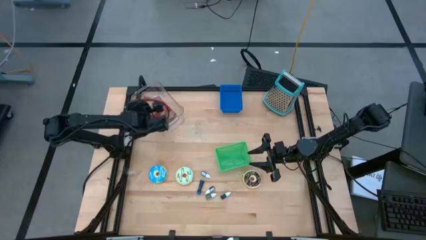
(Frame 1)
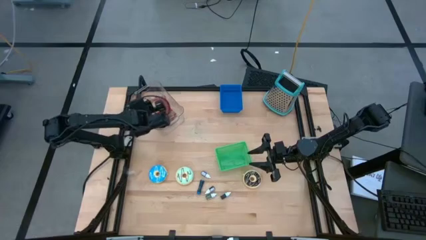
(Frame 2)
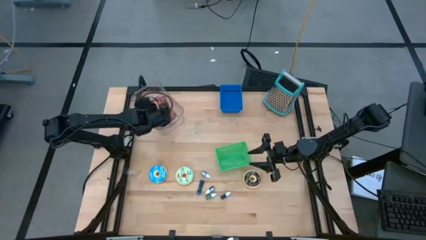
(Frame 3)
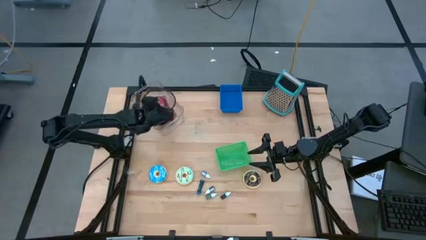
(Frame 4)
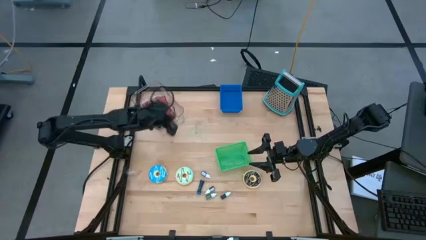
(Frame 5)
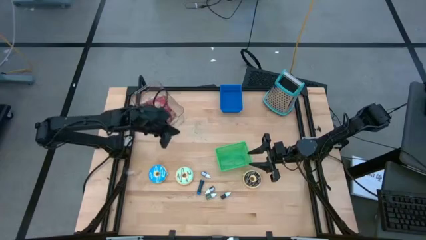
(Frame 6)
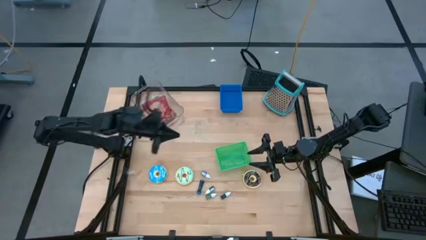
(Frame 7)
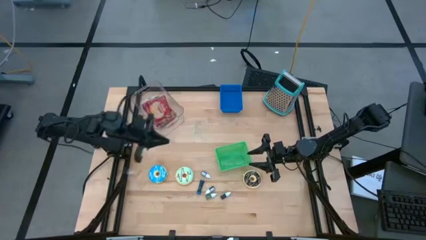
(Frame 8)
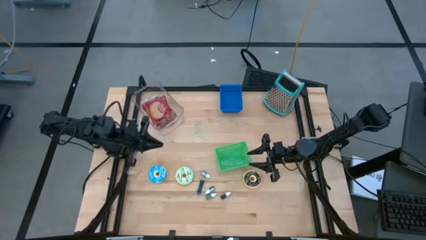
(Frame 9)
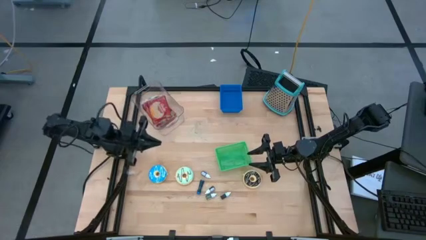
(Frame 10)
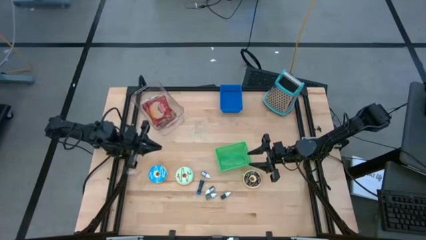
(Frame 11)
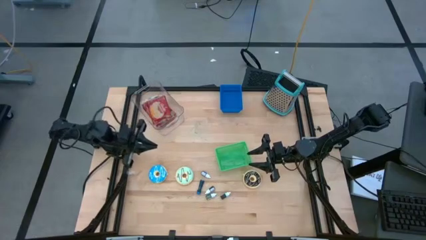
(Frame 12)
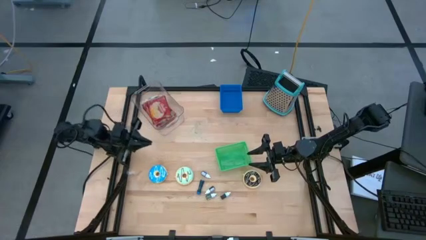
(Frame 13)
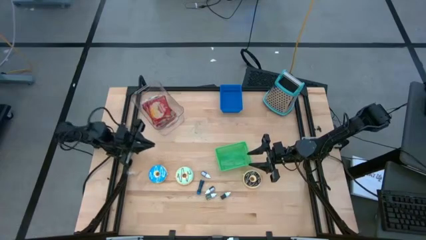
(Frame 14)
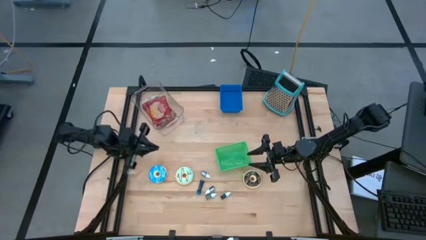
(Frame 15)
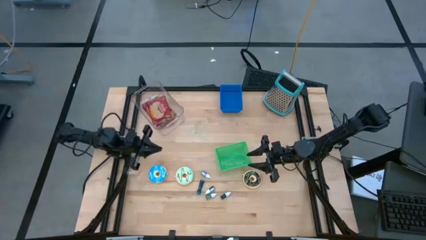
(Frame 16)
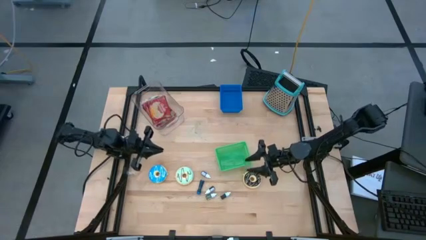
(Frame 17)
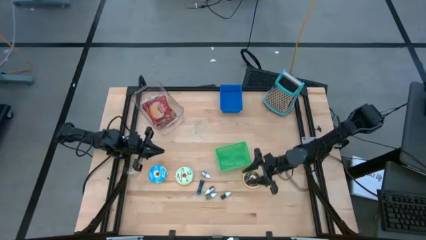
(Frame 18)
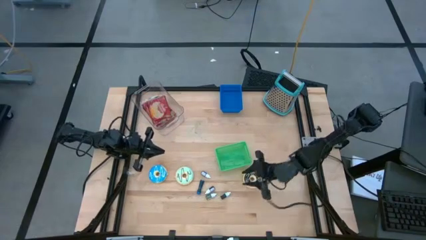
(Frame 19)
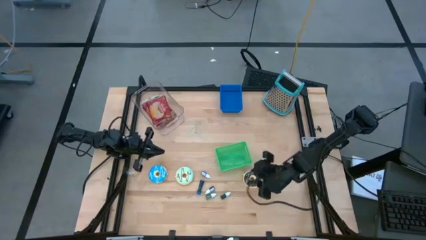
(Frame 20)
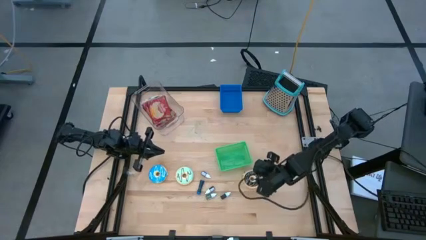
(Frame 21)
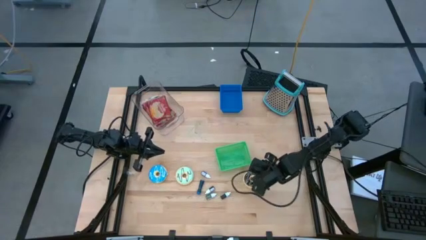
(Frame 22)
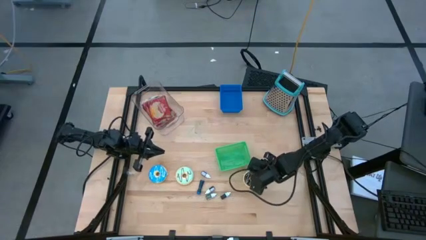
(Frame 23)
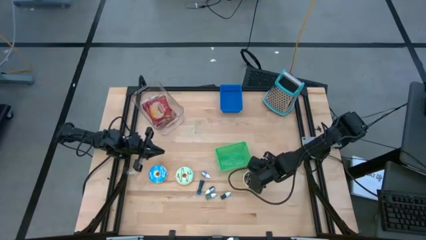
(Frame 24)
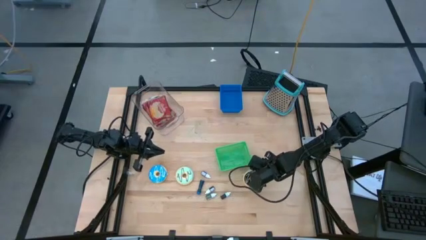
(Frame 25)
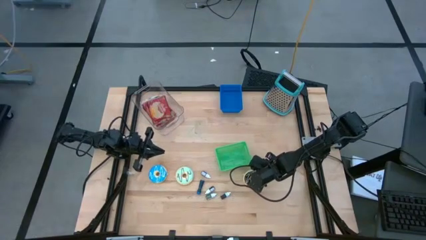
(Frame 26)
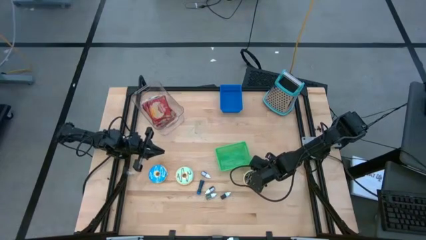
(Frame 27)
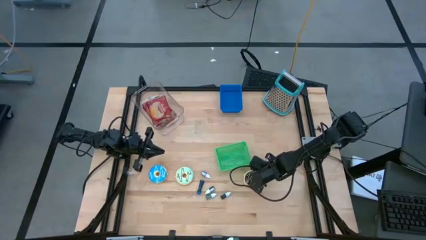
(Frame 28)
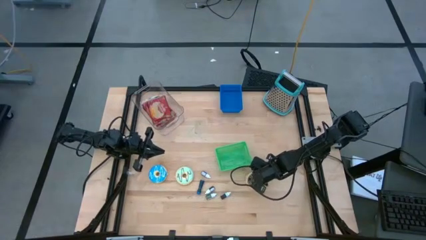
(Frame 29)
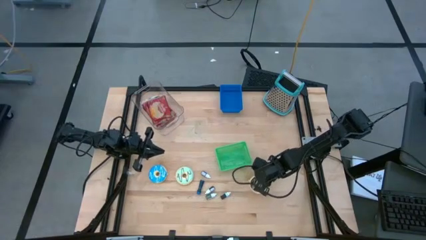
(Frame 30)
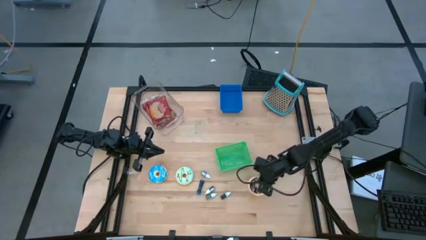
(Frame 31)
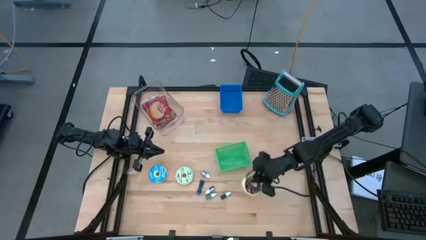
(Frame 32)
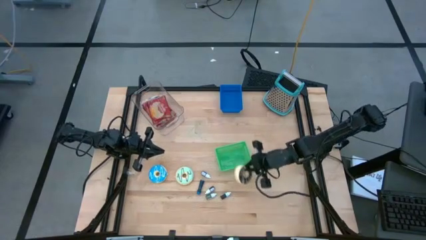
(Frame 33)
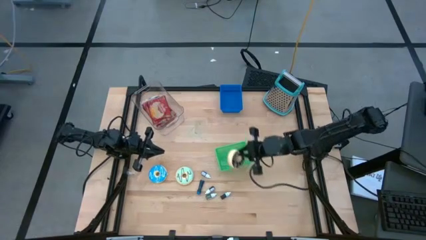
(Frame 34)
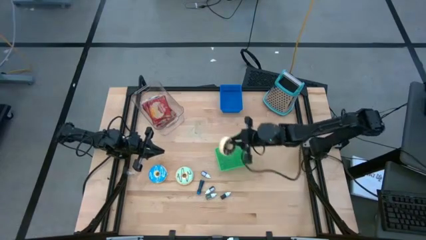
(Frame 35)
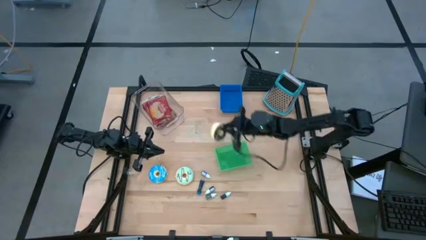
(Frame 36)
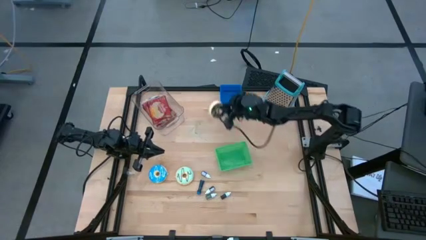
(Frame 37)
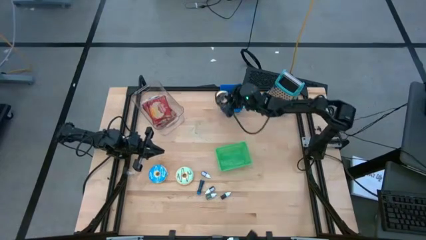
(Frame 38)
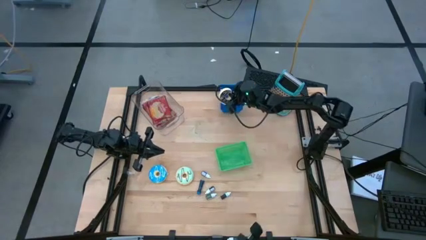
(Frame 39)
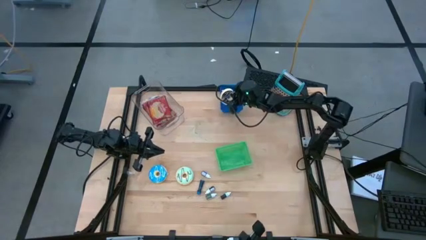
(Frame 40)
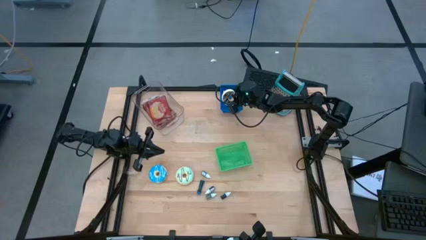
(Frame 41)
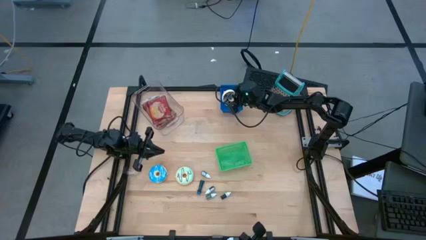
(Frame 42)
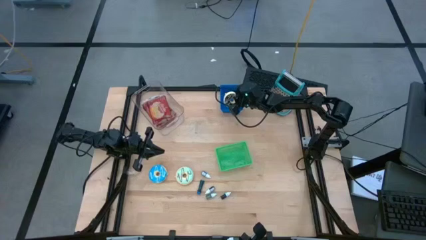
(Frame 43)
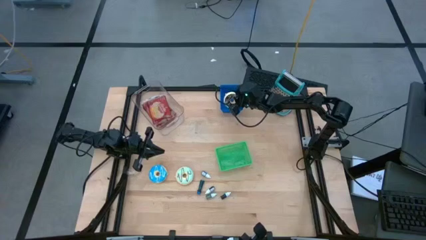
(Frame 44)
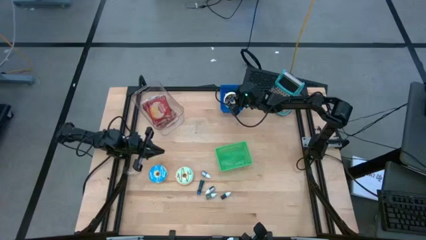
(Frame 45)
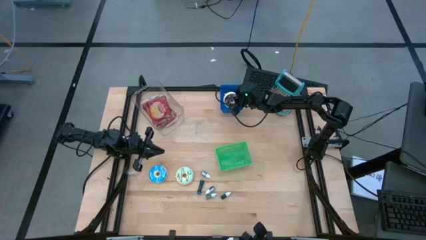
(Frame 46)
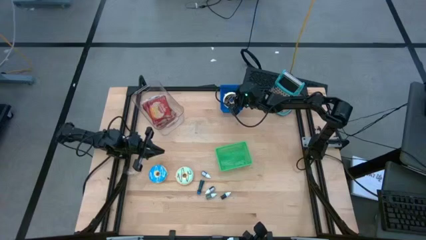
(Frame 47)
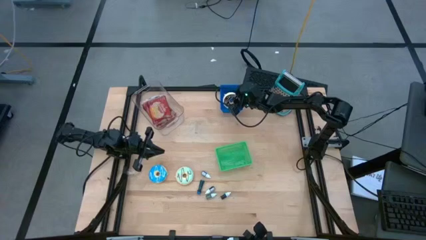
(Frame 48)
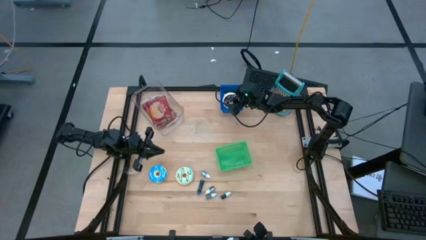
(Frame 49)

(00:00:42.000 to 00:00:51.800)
Put the black donut into the blue bin

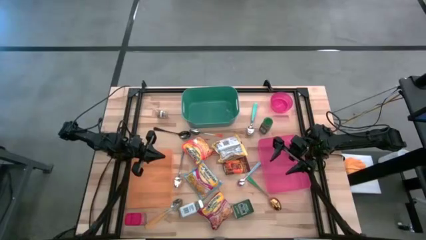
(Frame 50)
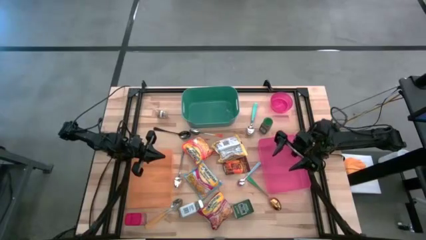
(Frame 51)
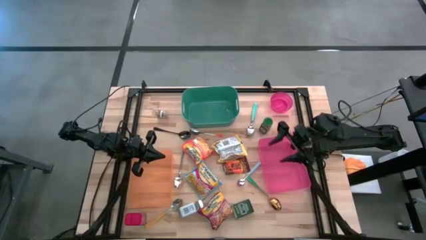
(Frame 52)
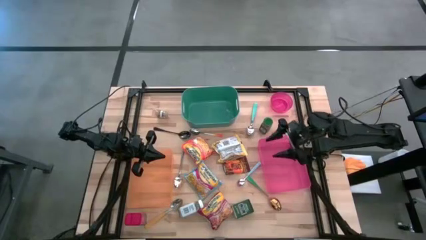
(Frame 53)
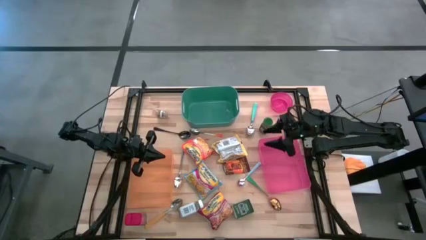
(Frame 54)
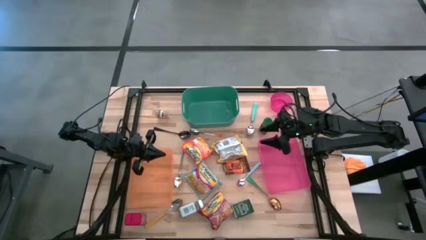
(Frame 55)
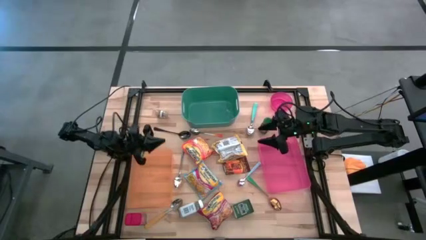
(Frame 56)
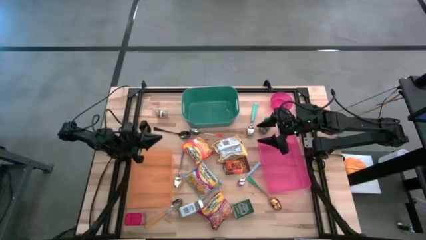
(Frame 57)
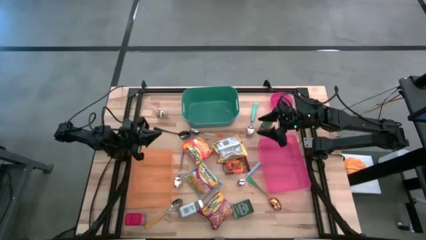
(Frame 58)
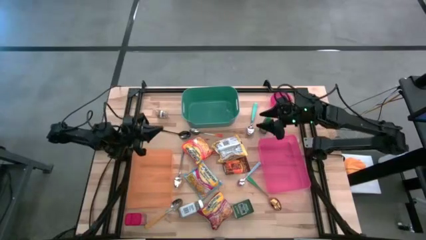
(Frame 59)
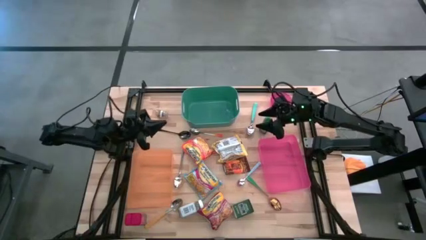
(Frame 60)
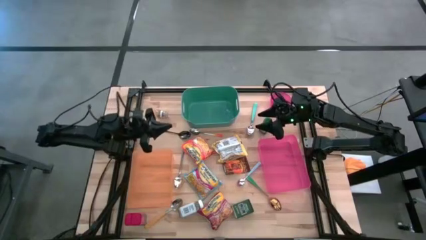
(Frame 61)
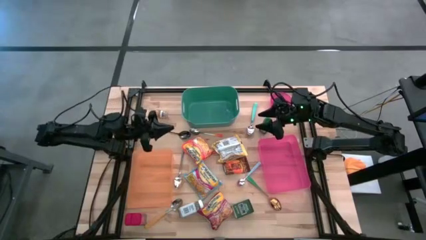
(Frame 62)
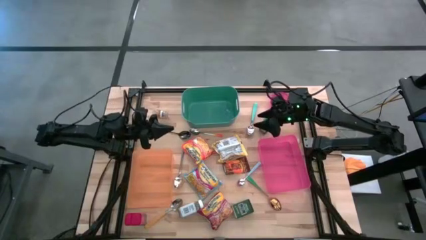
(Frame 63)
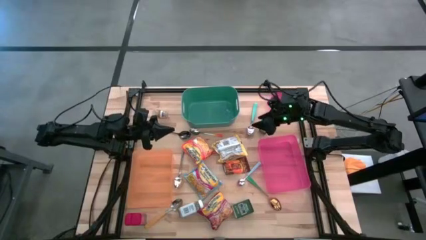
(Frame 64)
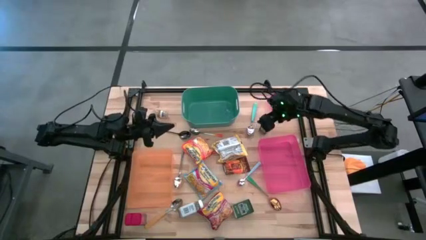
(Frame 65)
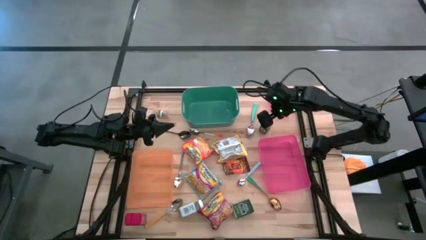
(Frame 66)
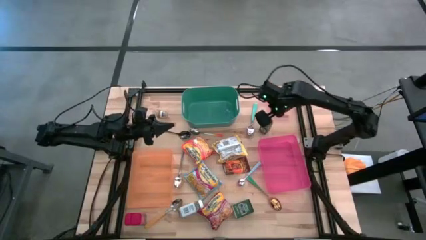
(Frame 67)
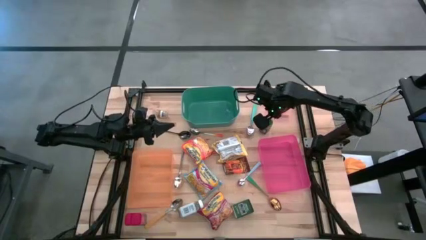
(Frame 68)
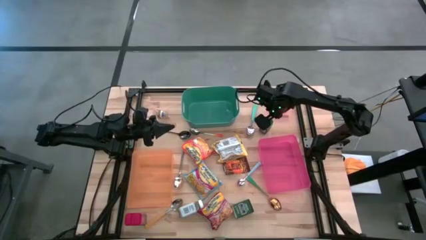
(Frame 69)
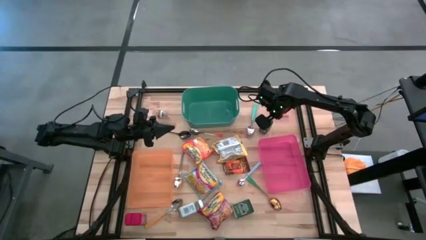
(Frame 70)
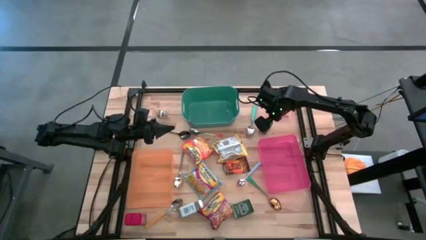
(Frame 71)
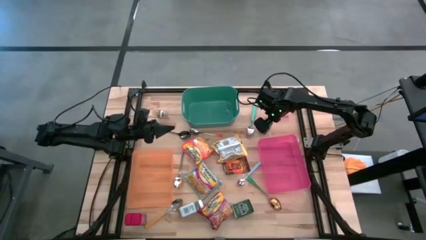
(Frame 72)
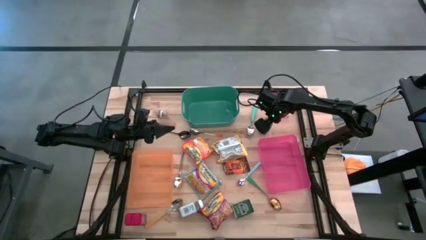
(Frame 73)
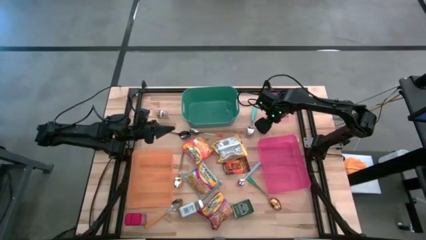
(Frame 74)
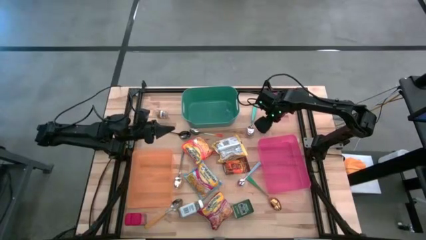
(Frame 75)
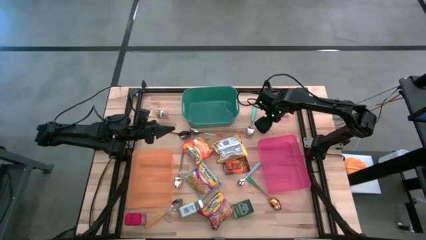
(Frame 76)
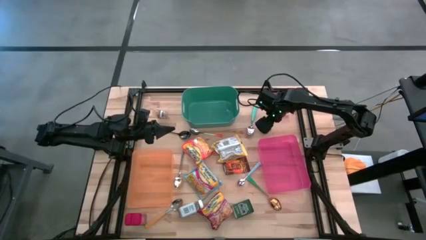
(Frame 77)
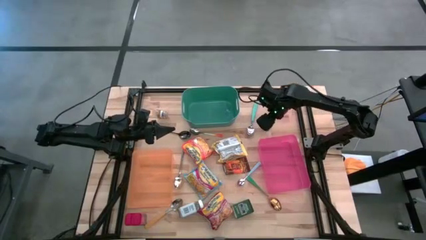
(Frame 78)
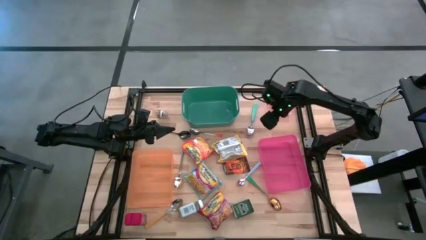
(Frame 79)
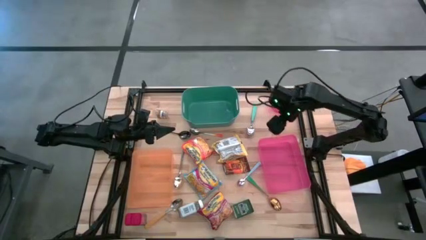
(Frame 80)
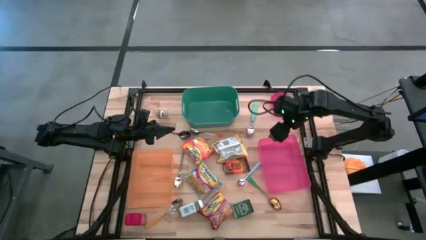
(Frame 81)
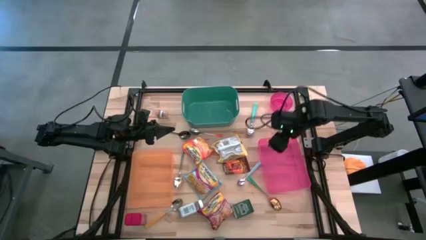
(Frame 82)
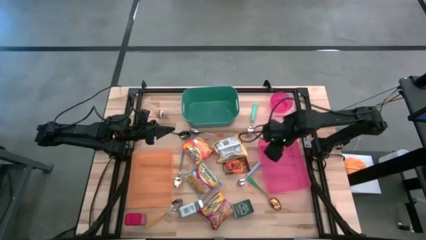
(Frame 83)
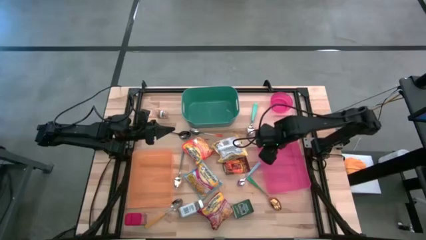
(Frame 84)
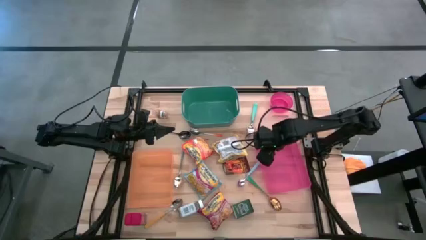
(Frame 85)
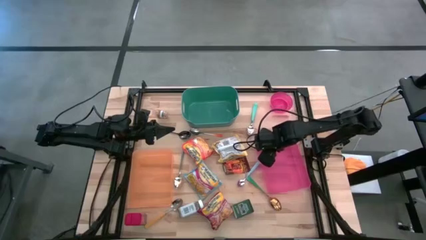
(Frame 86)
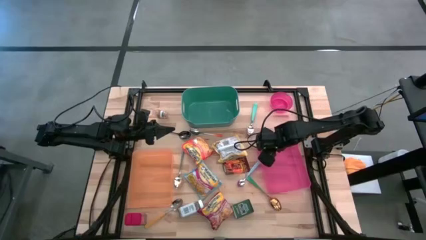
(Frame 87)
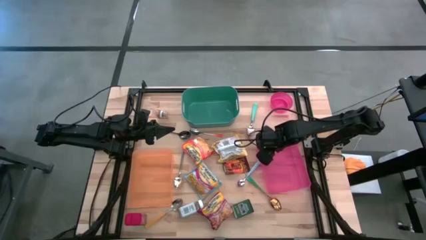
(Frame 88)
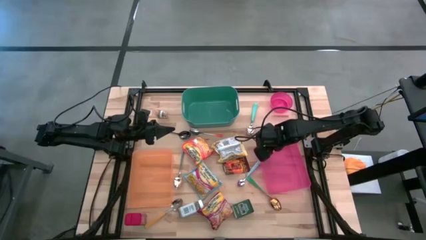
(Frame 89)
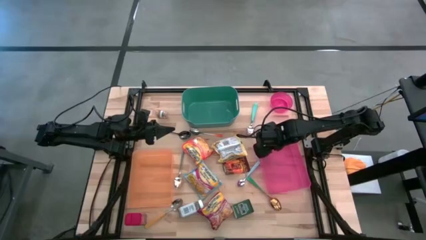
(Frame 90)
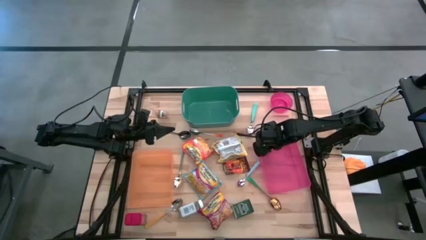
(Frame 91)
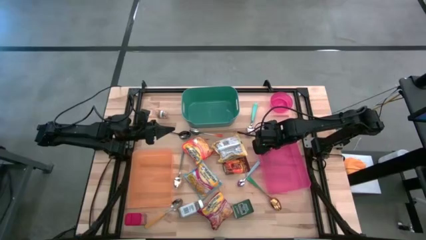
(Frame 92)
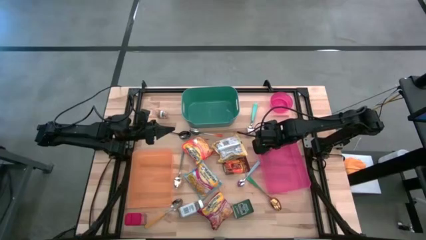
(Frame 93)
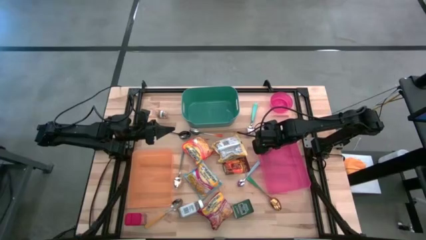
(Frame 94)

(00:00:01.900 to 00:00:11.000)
Put the green spice bottle into the pink bin
